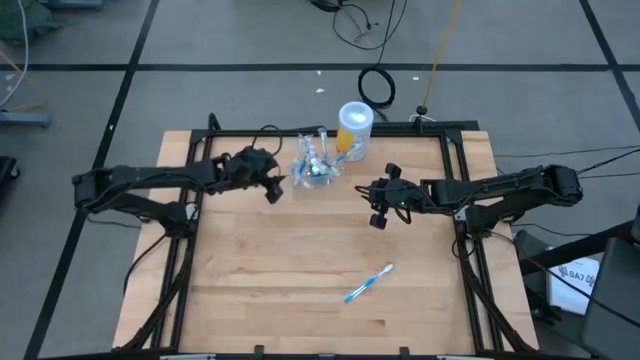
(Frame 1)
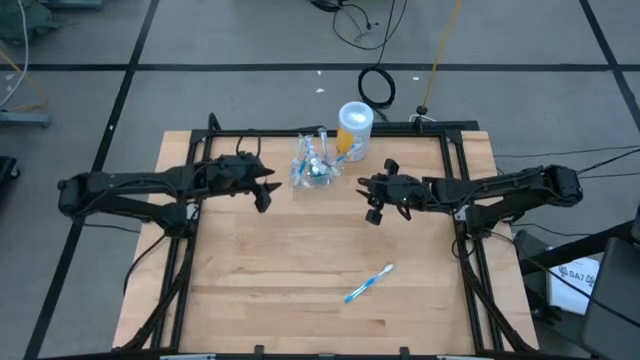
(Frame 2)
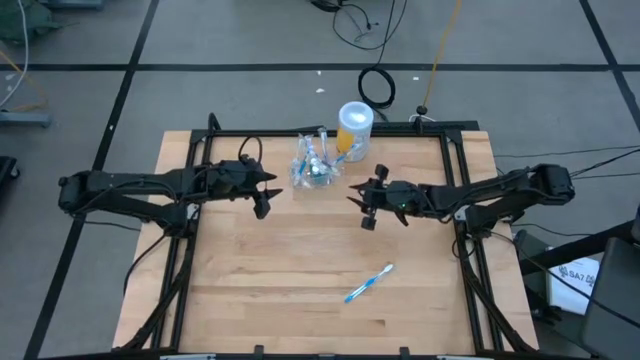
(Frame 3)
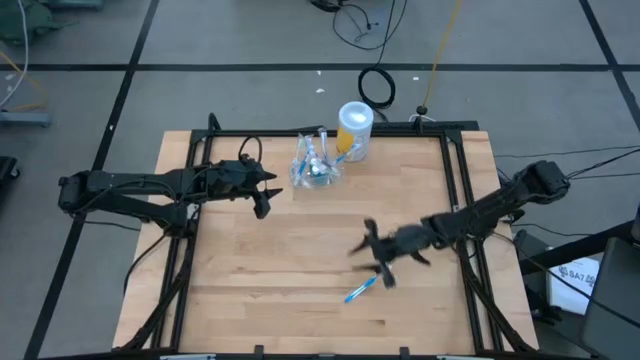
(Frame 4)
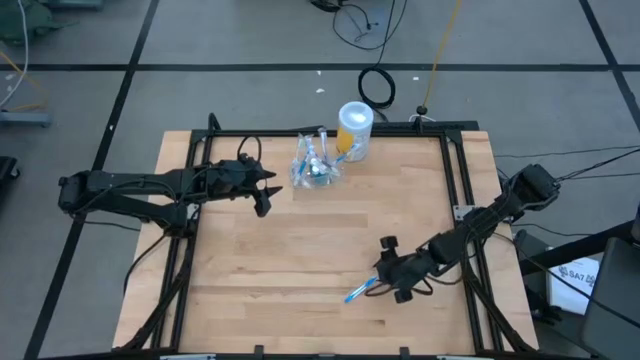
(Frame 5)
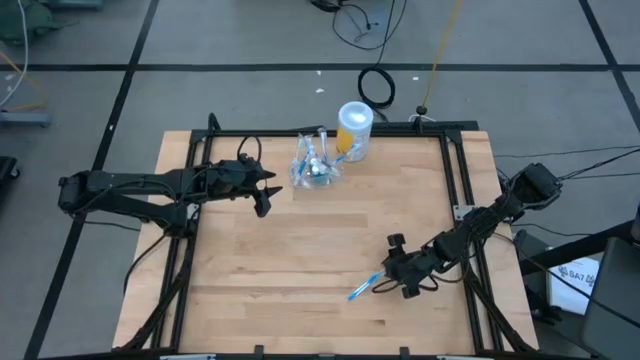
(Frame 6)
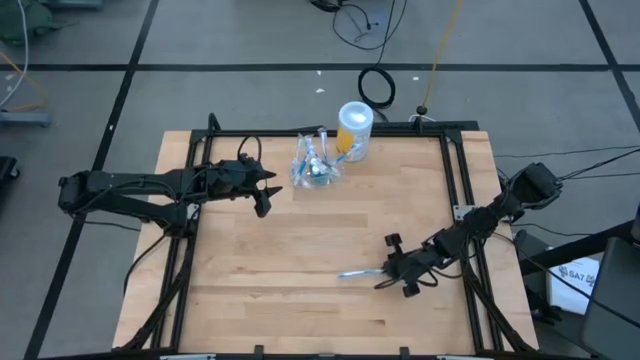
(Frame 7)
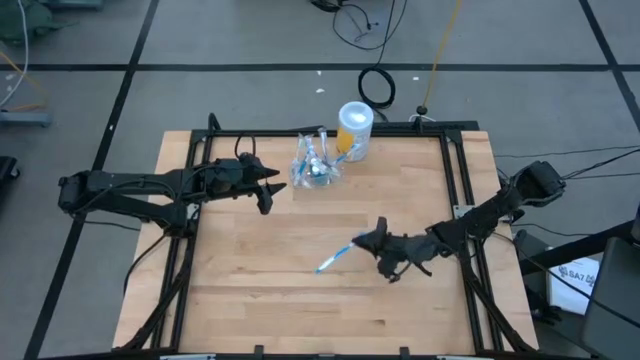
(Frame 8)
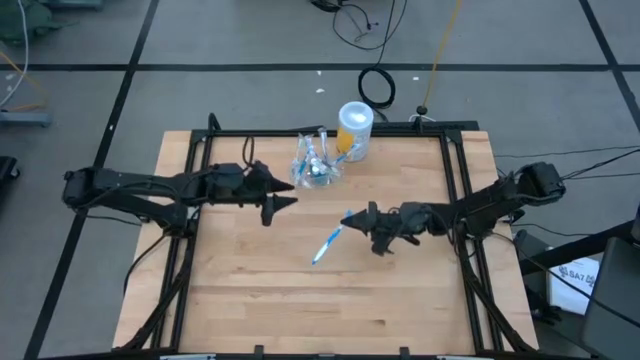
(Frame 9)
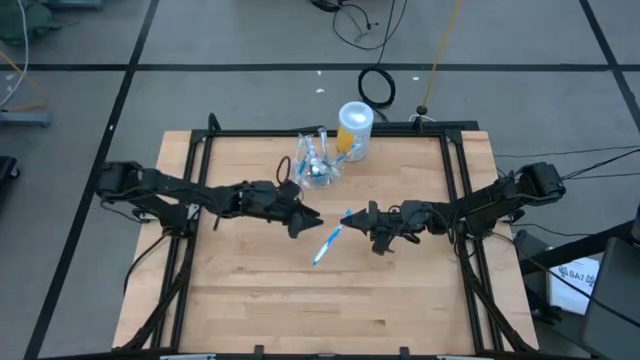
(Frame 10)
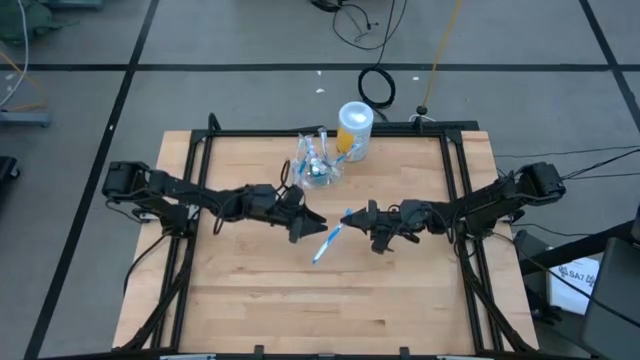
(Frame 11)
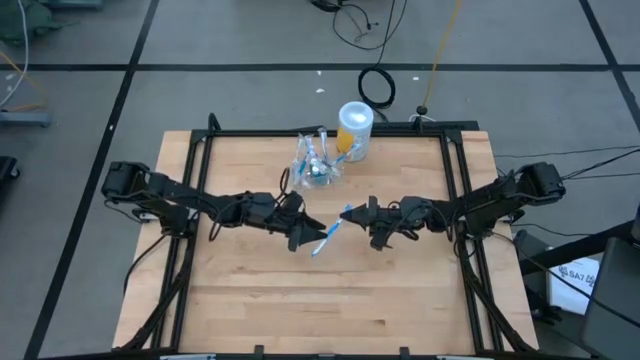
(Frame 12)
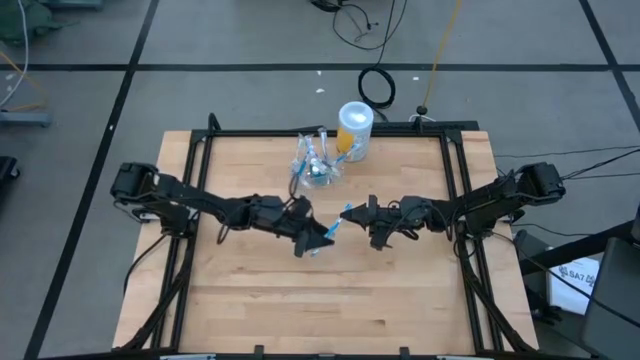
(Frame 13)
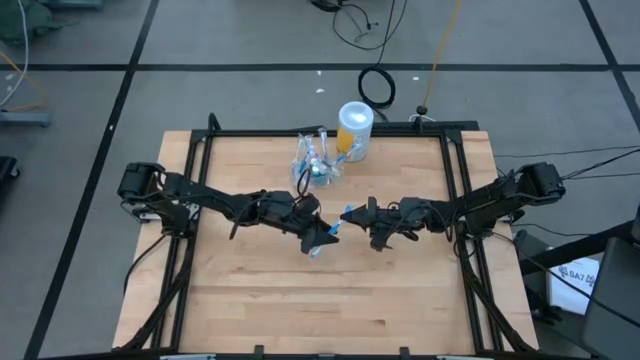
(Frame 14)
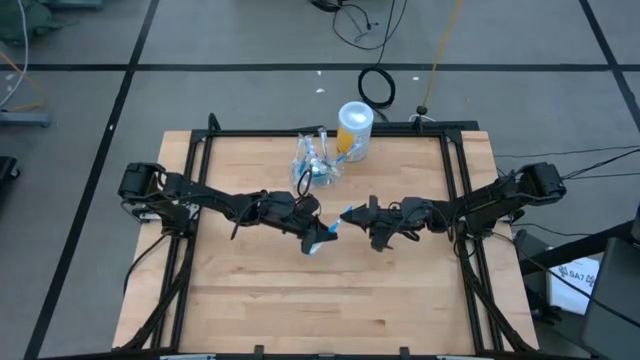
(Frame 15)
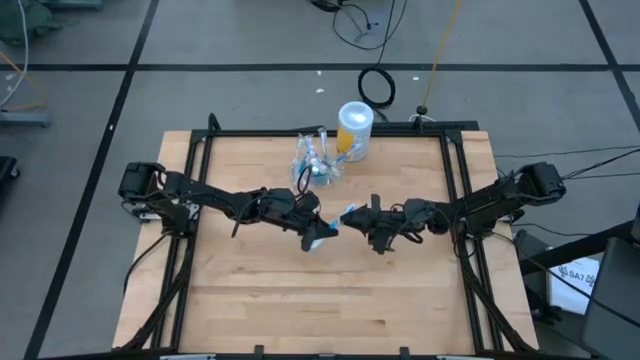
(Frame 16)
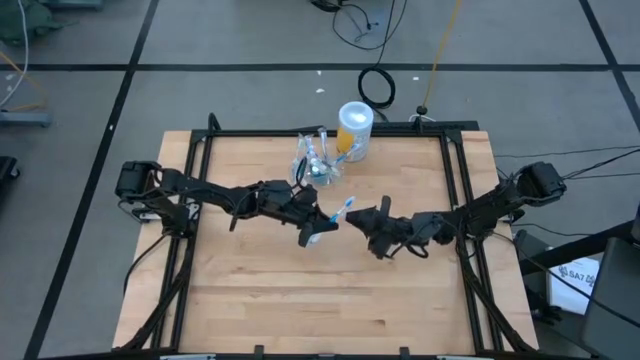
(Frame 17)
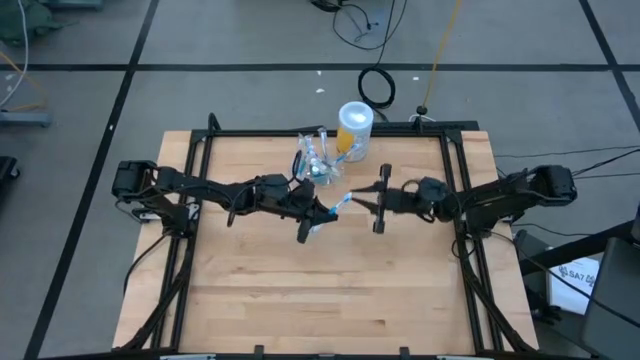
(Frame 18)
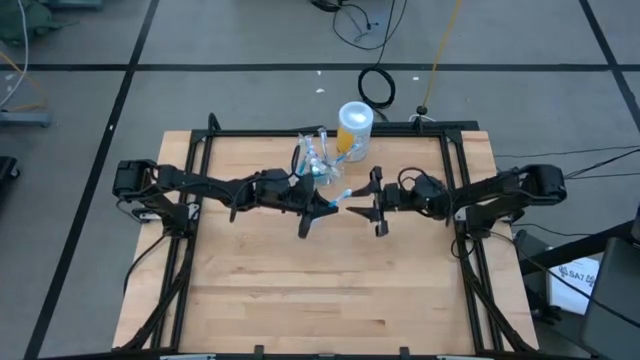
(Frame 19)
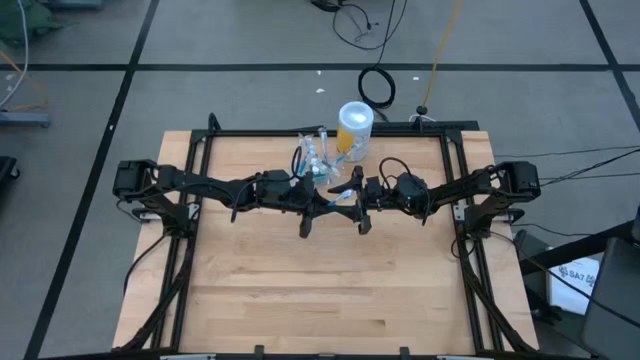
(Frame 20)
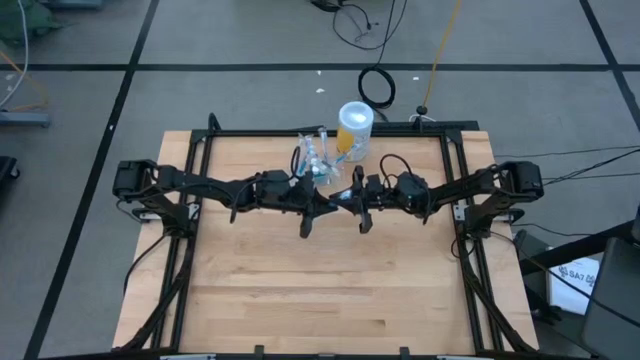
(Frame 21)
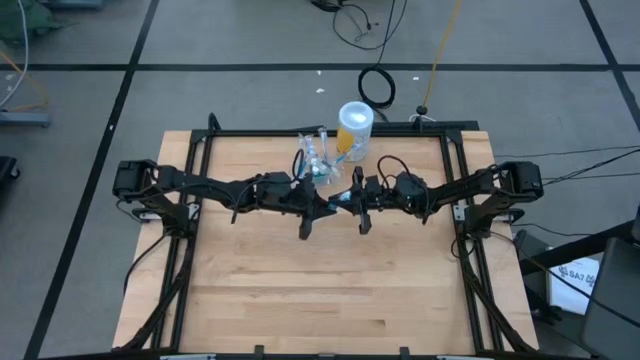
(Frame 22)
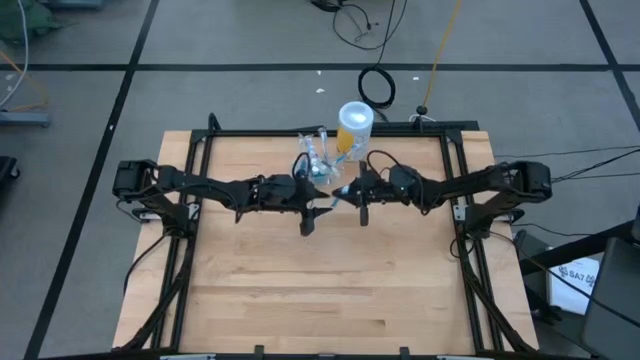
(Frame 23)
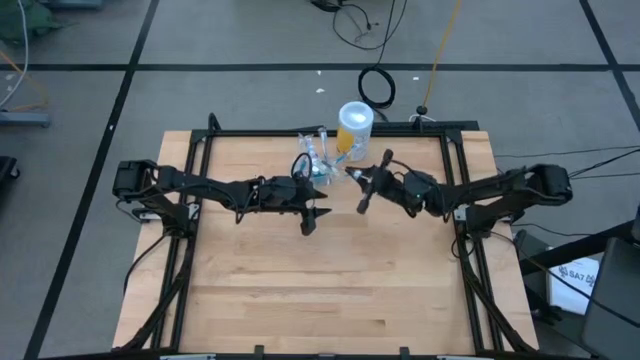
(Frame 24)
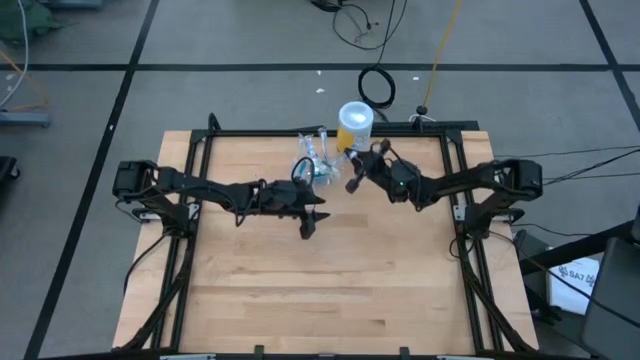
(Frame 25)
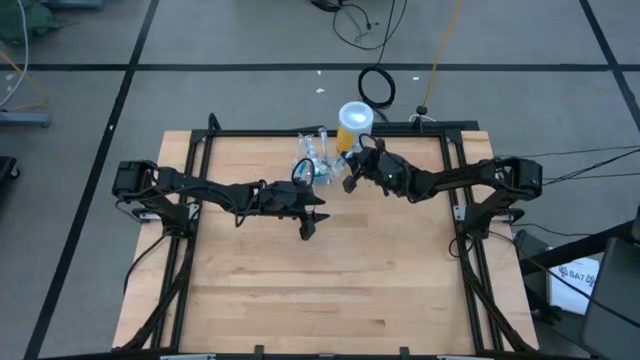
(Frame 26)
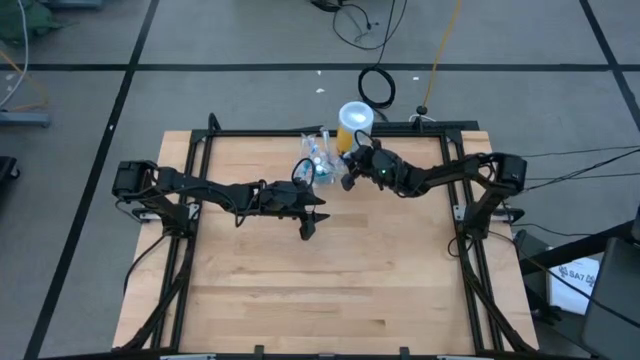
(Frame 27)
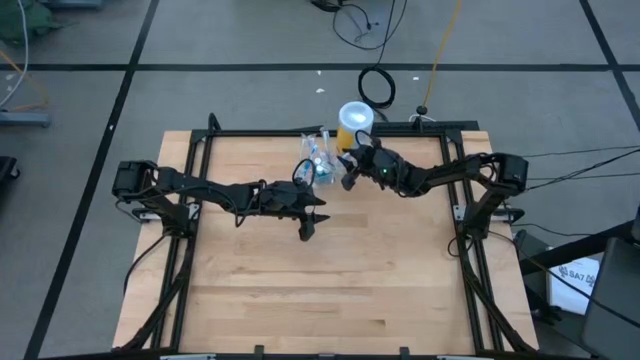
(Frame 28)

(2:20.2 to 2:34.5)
Task: Pick & Place toothbrushing station
Put the blue toothbrush into the right section of the transparent organizer

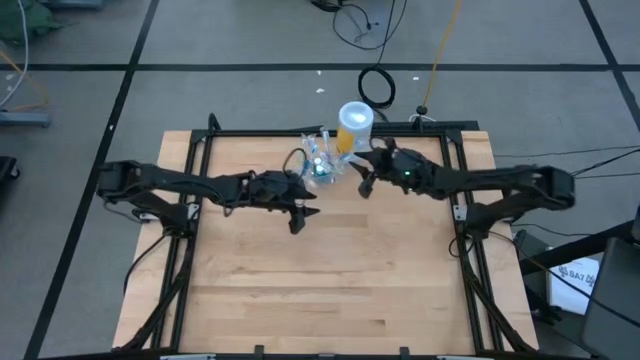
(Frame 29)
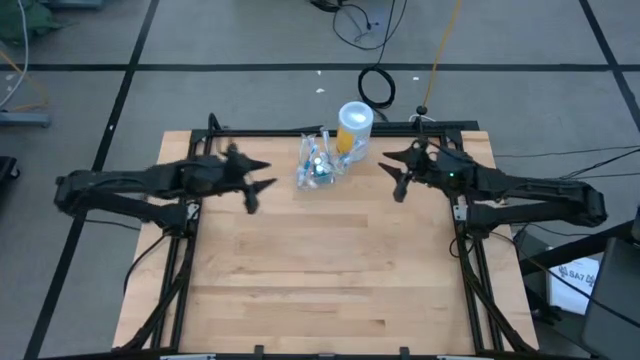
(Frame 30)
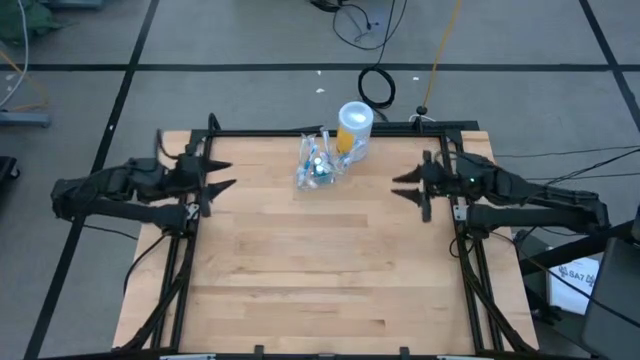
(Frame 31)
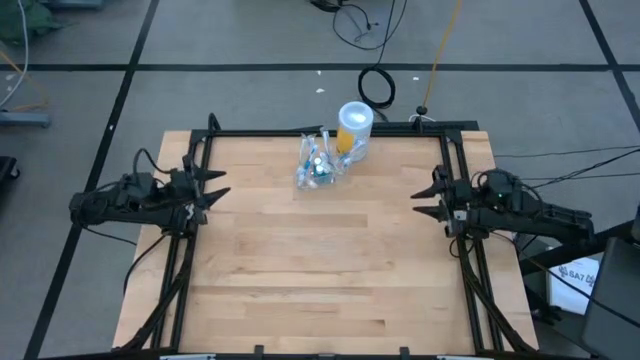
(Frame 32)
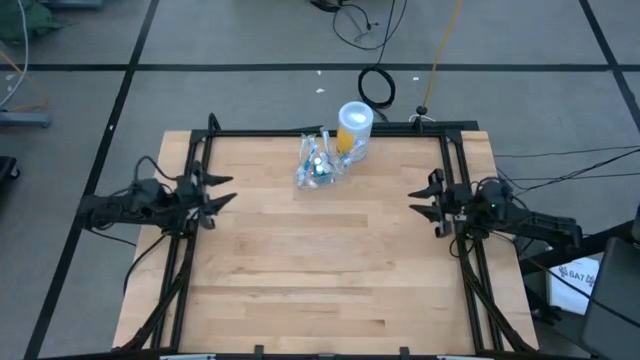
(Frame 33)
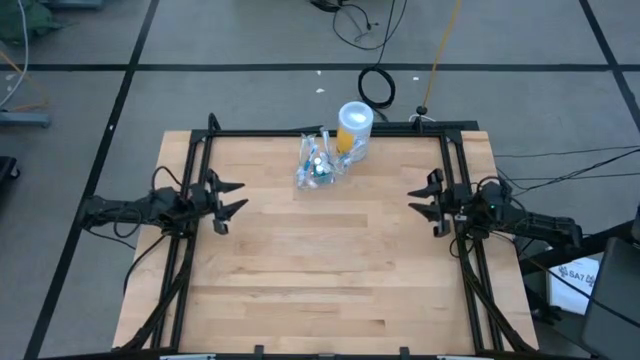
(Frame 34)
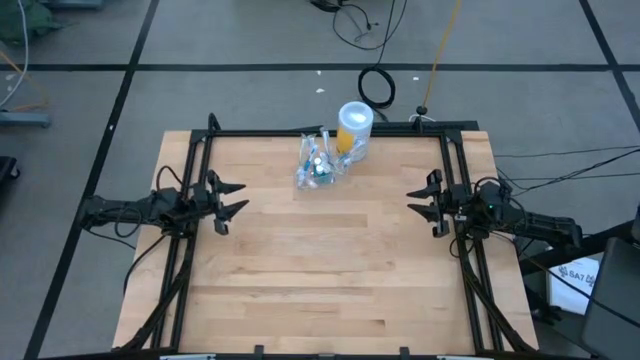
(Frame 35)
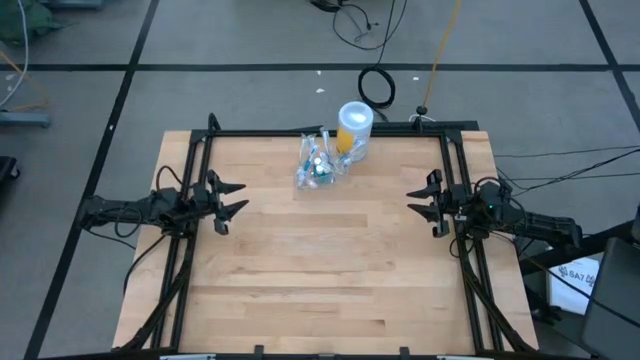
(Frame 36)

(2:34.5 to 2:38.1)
Return to Home Position

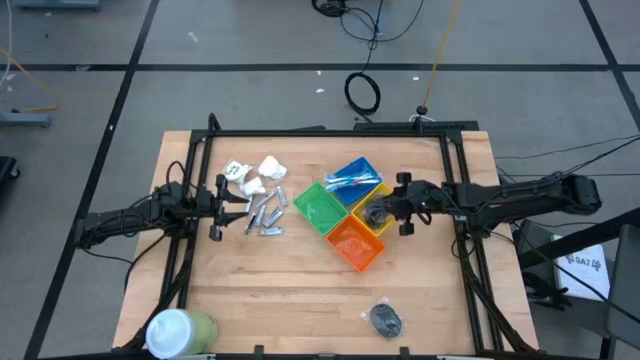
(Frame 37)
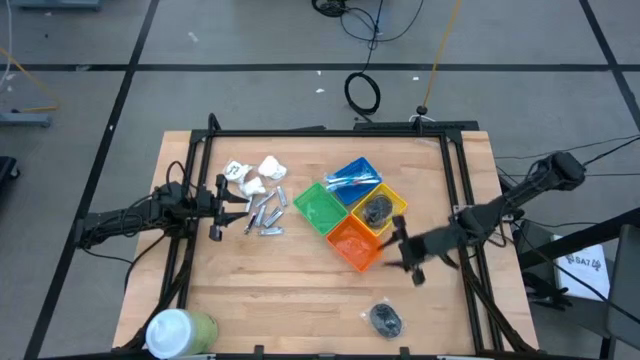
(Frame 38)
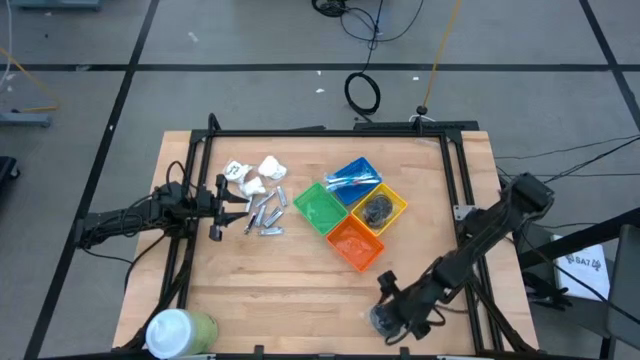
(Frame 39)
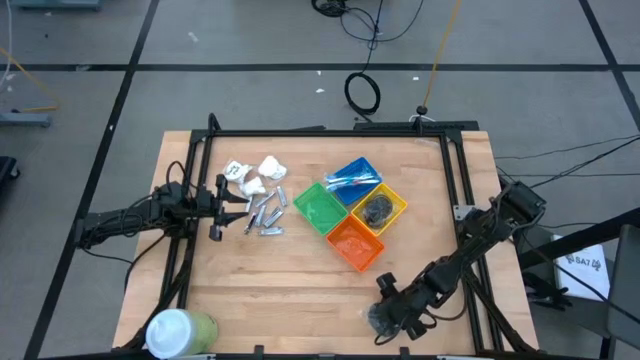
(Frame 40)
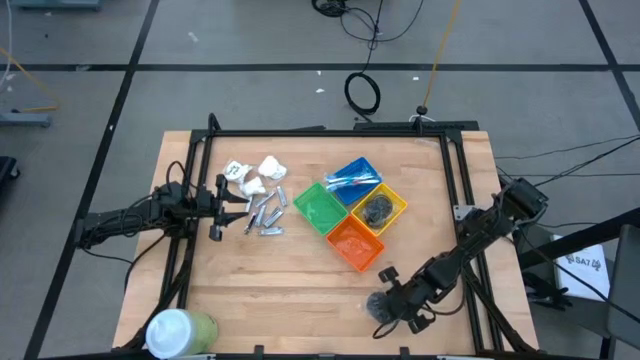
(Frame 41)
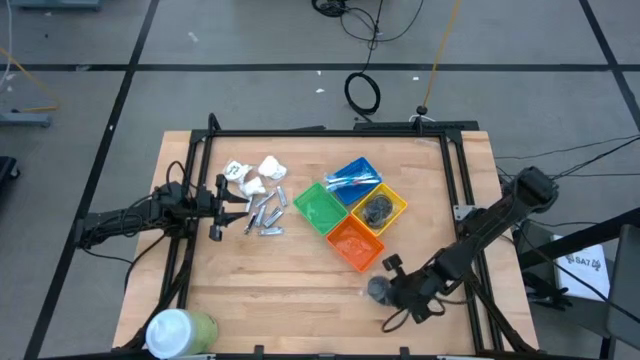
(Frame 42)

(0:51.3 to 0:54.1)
Task: Pick & Place Travel size toiletries
Put the black hairbrush into the yellow bin

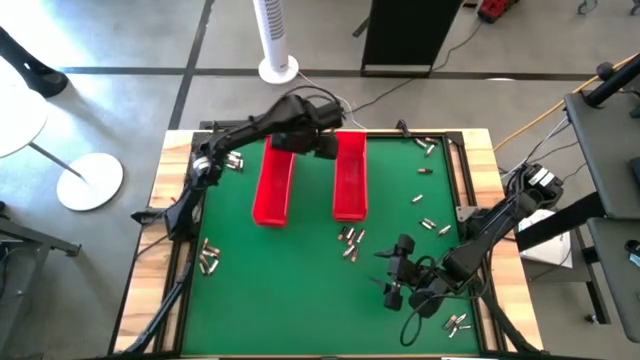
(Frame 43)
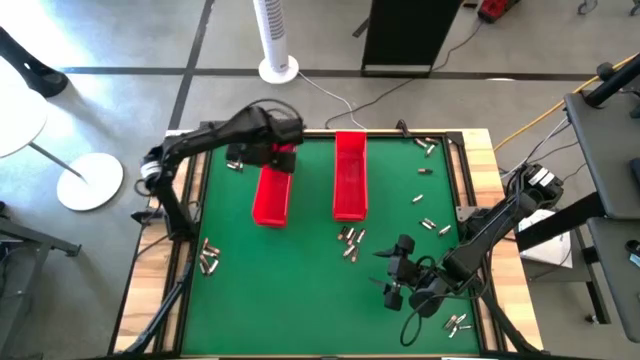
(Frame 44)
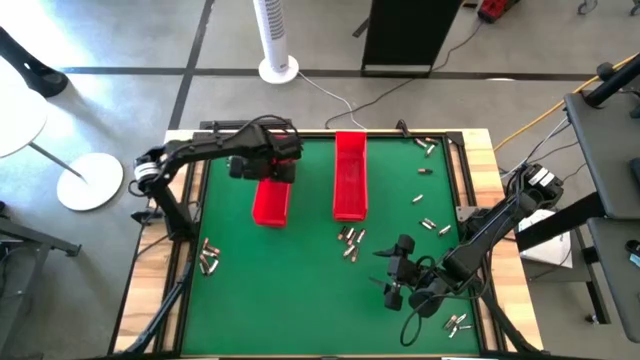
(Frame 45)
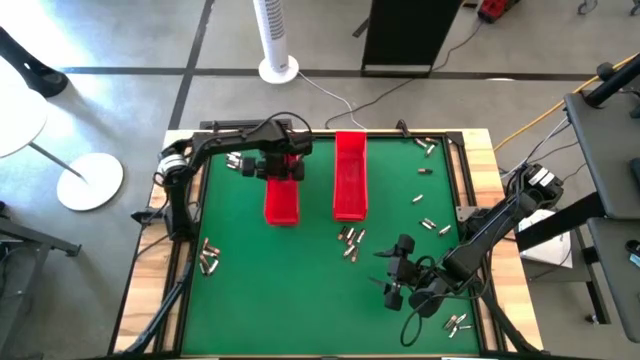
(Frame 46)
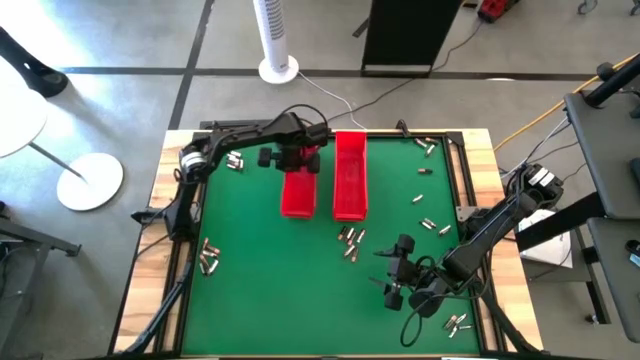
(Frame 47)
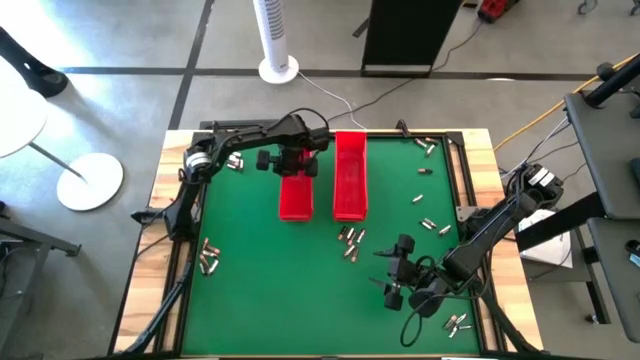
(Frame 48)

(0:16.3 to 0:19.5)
Task: Sort batteries
Adjust the left red bin
